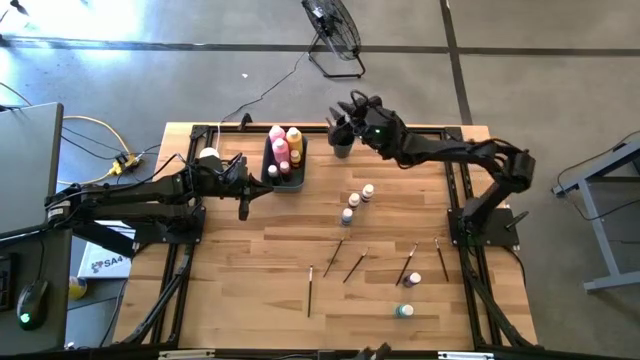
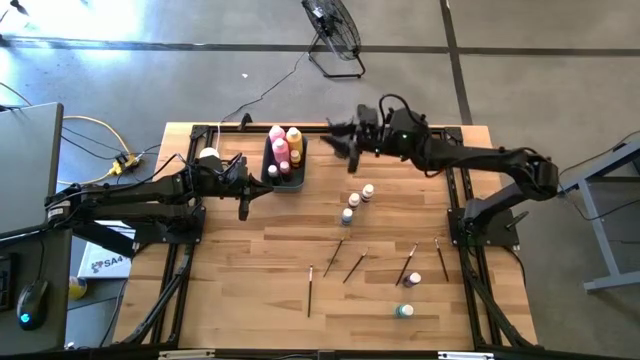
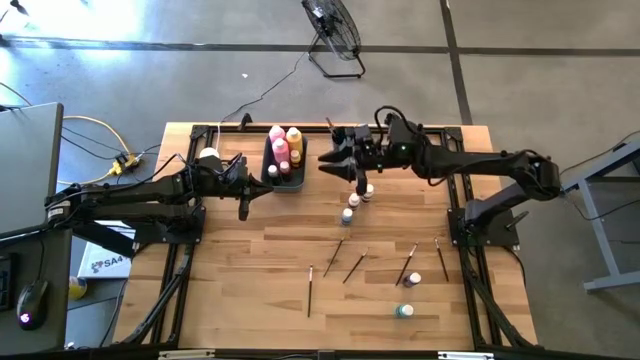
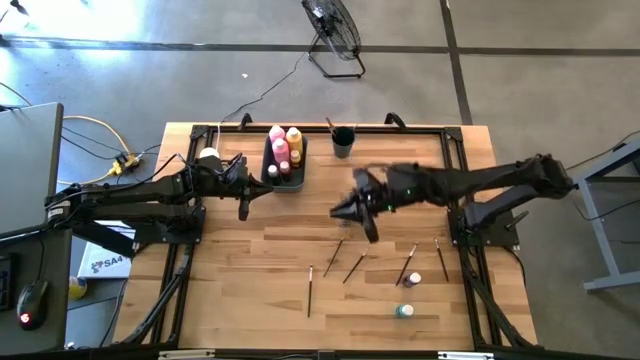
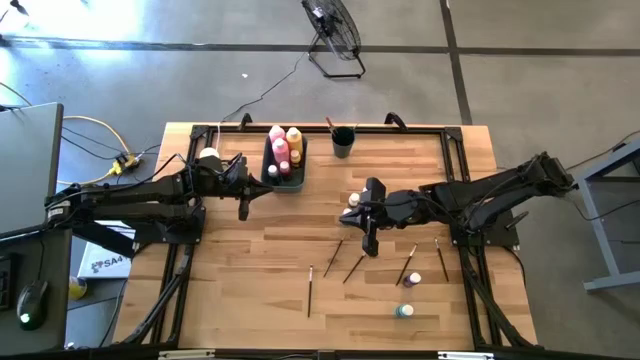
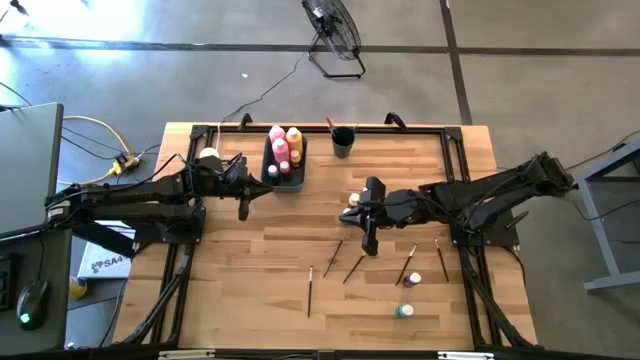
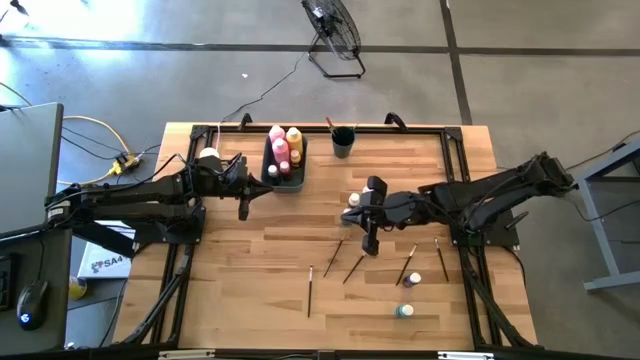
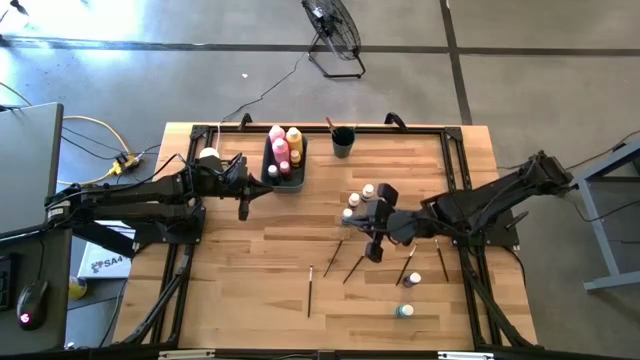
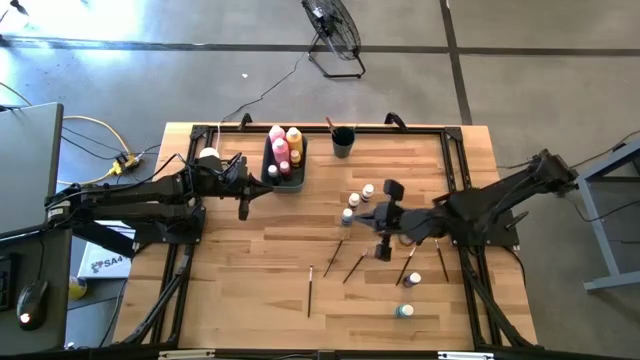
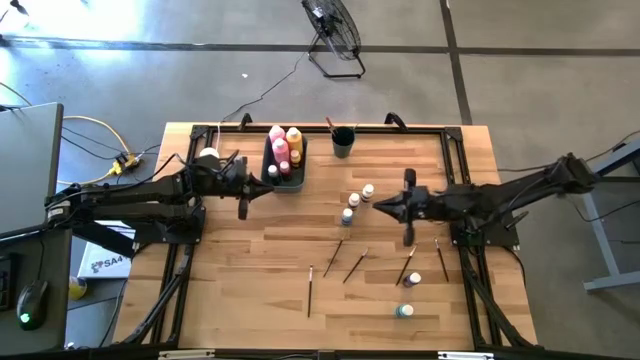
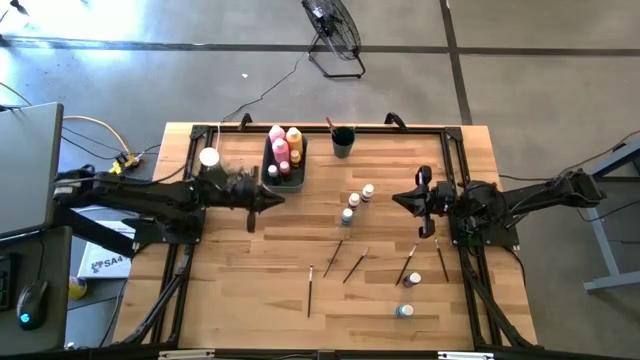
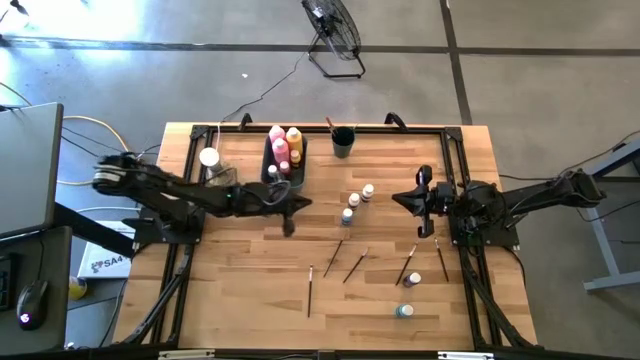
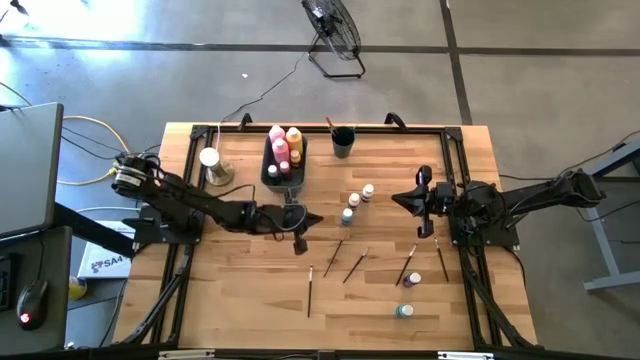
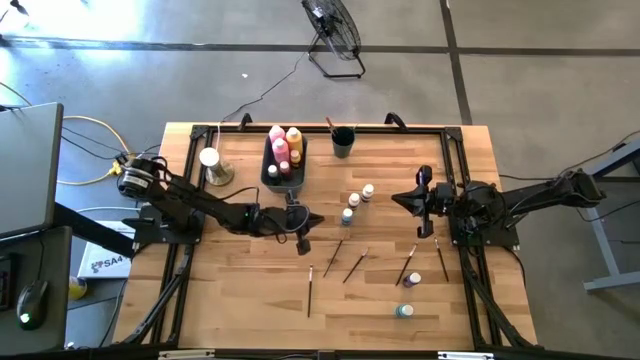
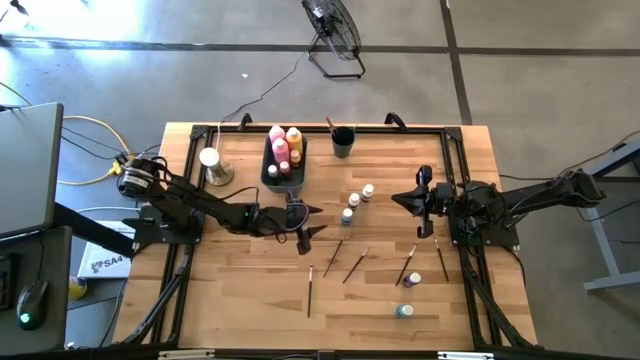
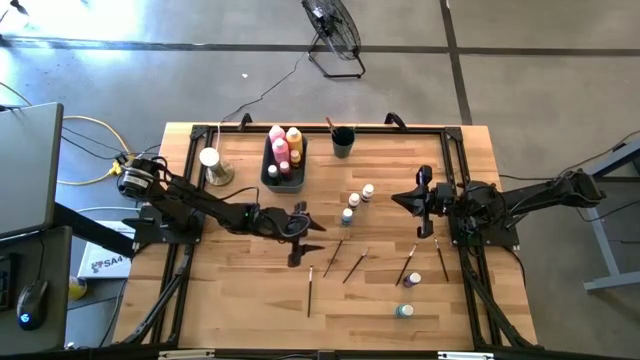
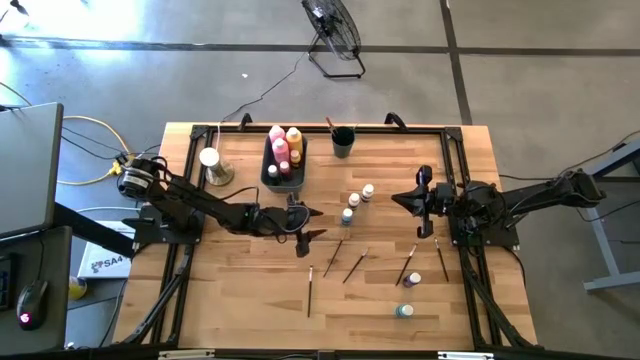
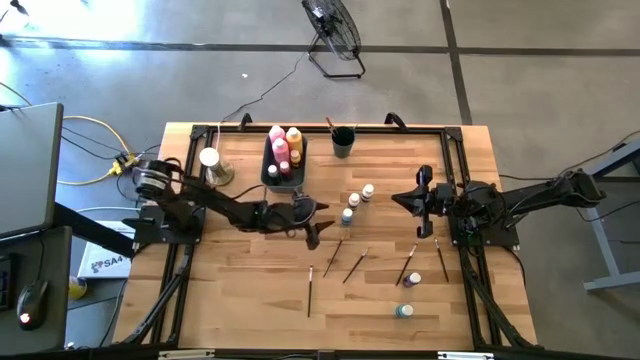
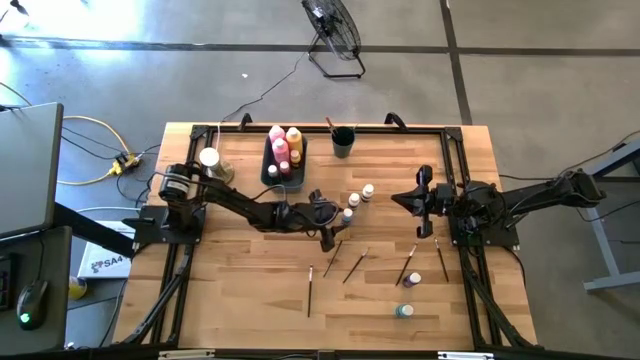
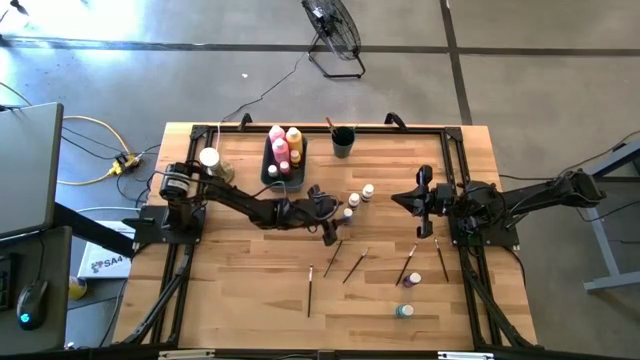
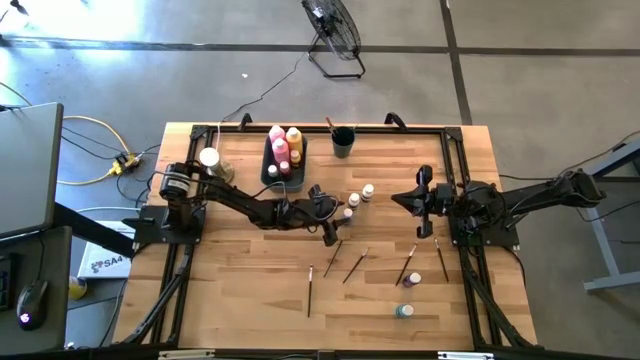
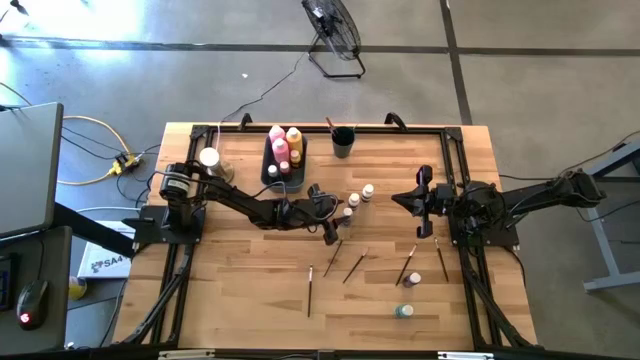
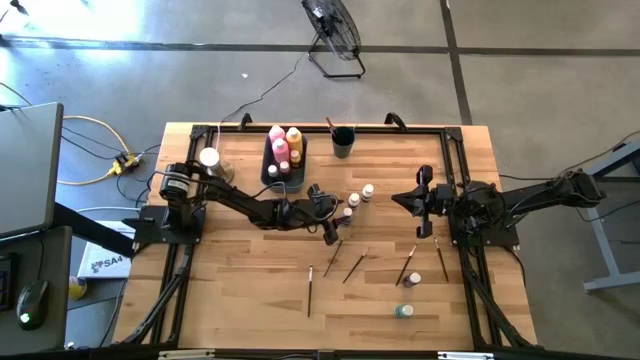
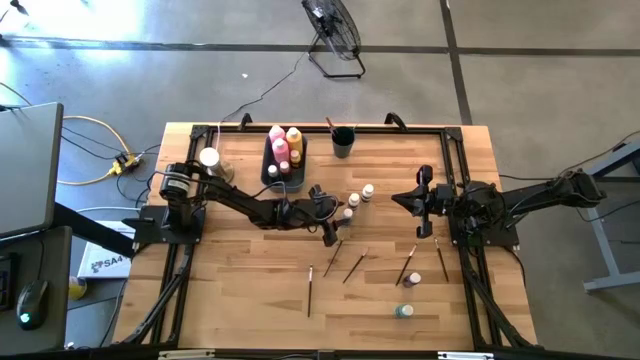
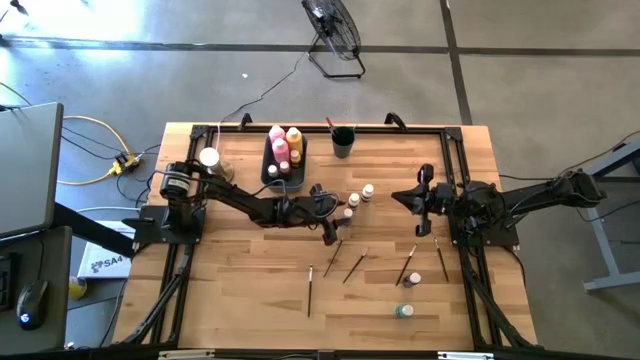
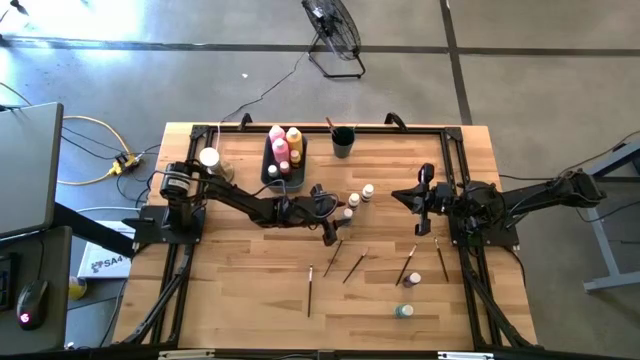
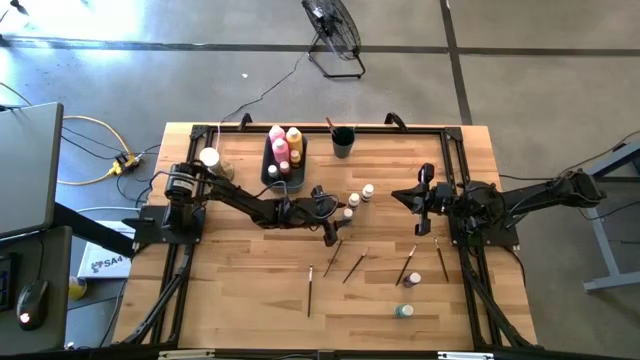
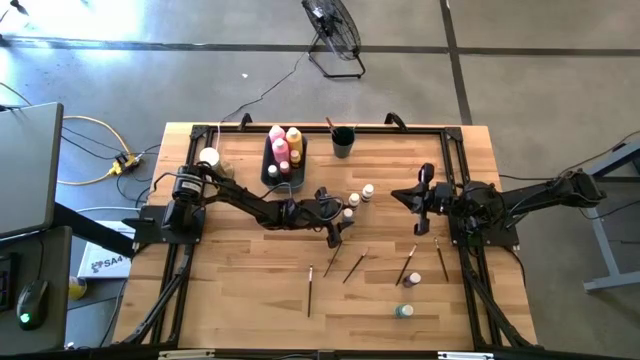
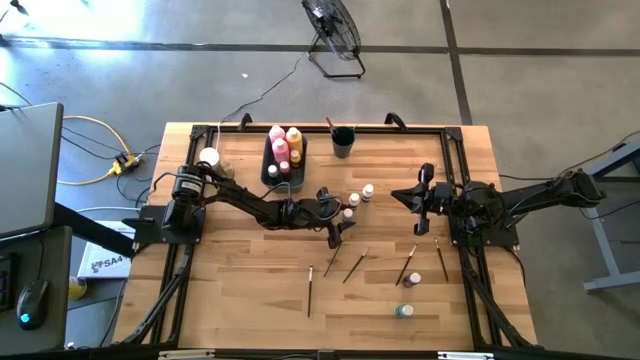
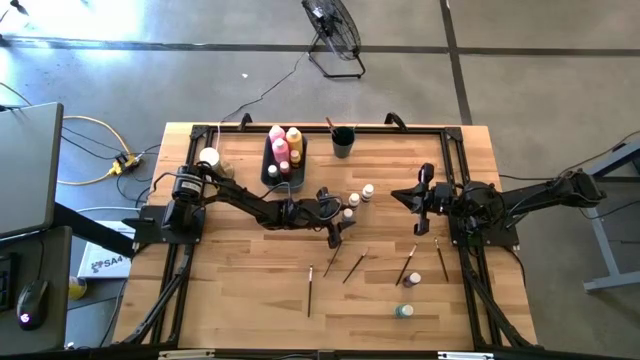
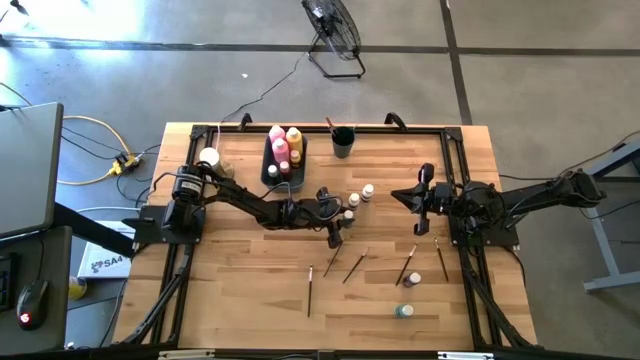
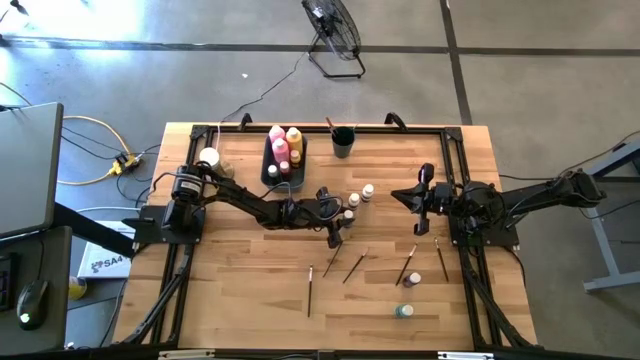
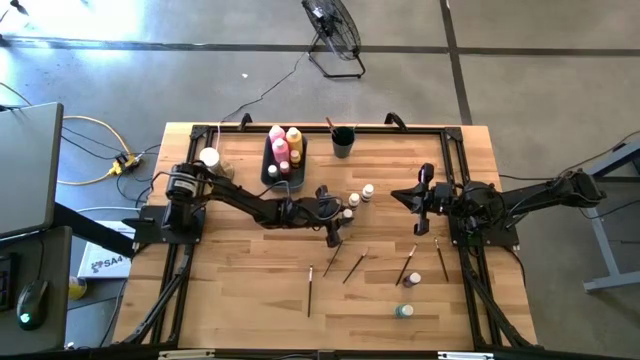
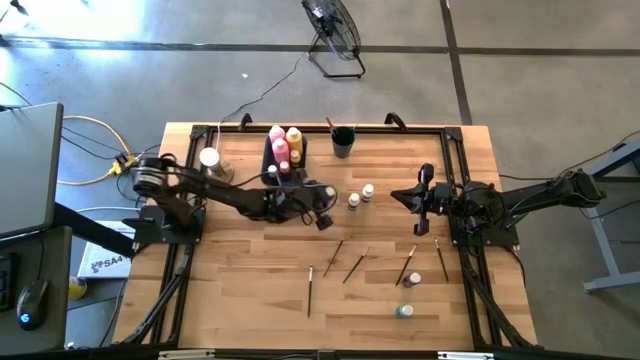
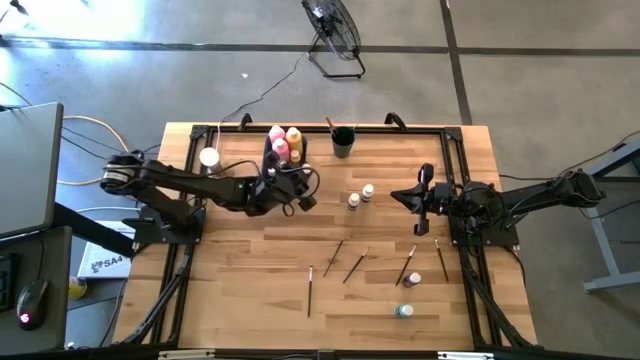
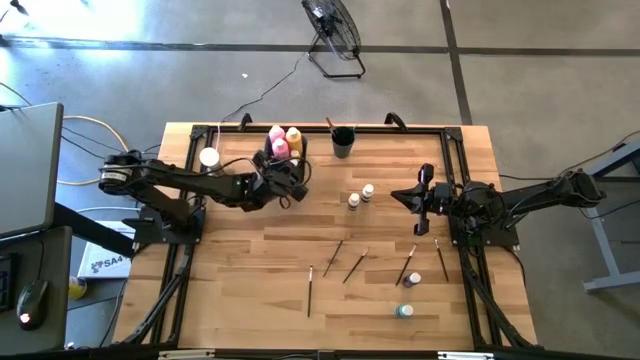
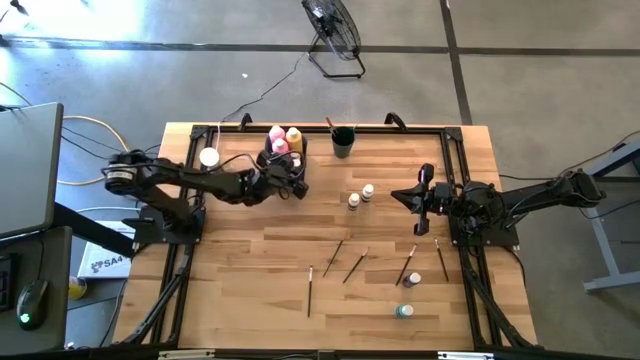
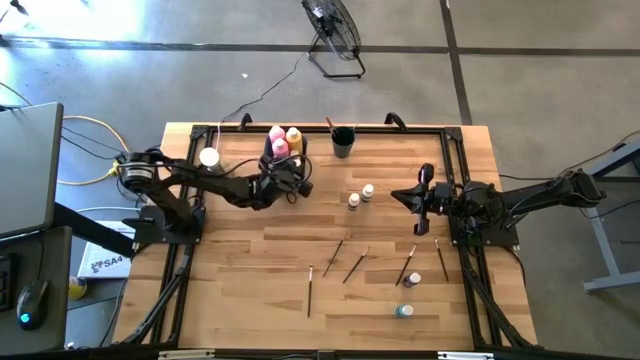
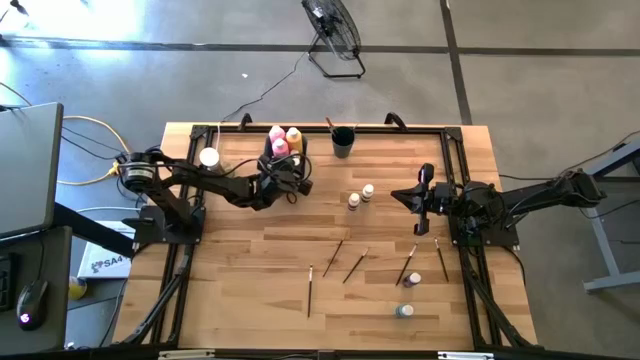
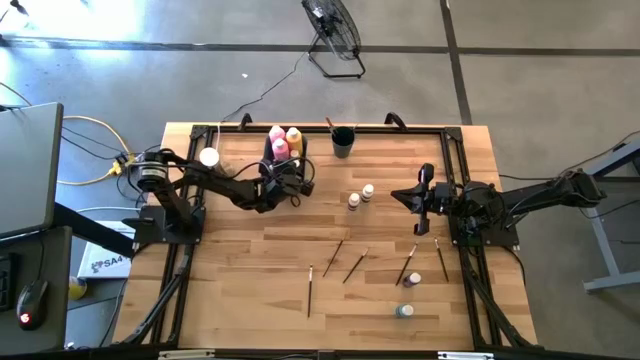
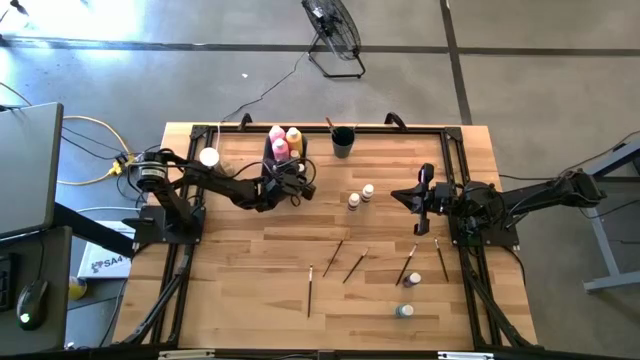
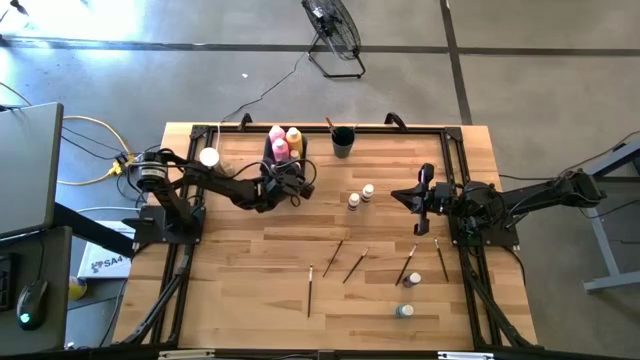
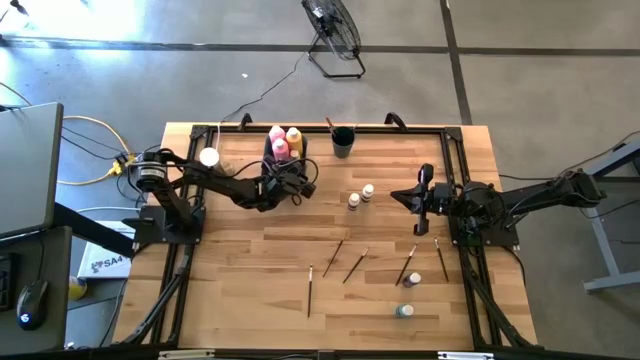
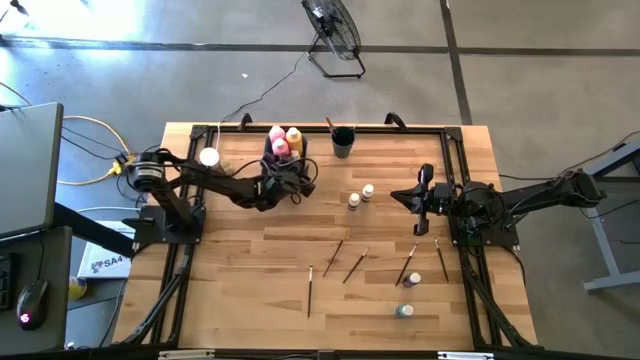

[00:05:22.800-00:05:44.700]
Task: Pick & Place Paint Supplies
Put the small blue paint bottle into the green bin
